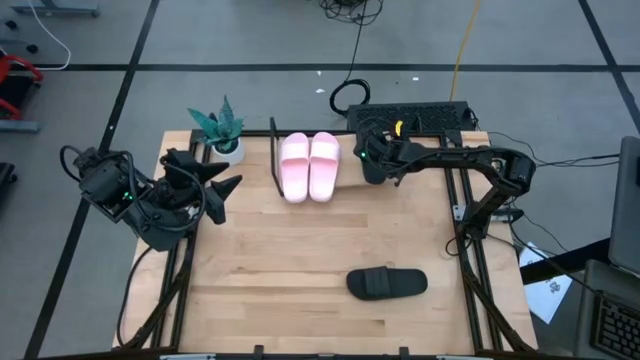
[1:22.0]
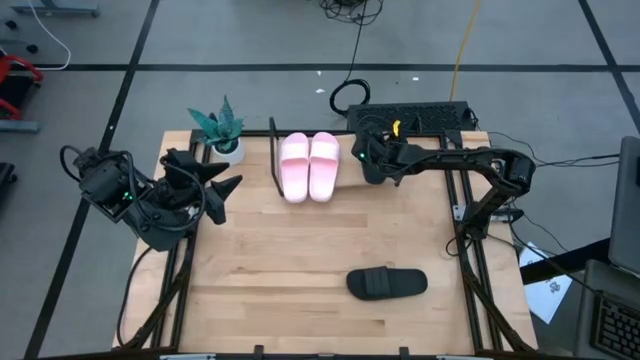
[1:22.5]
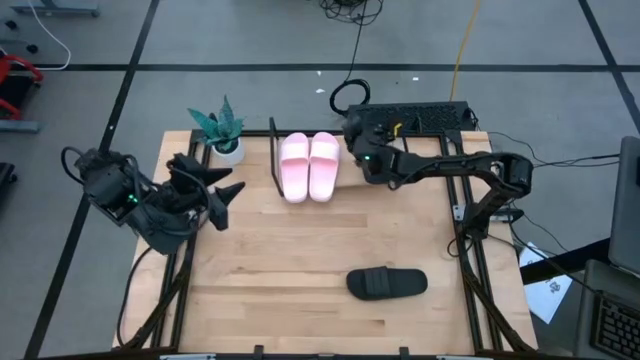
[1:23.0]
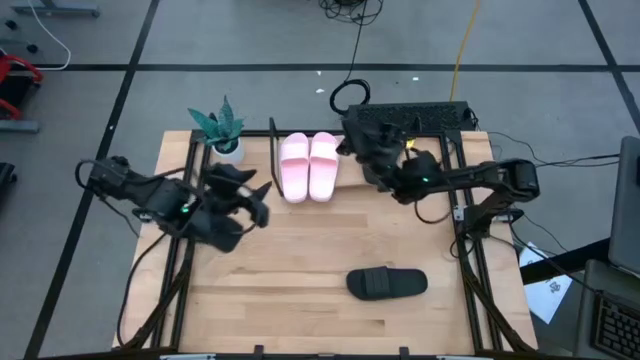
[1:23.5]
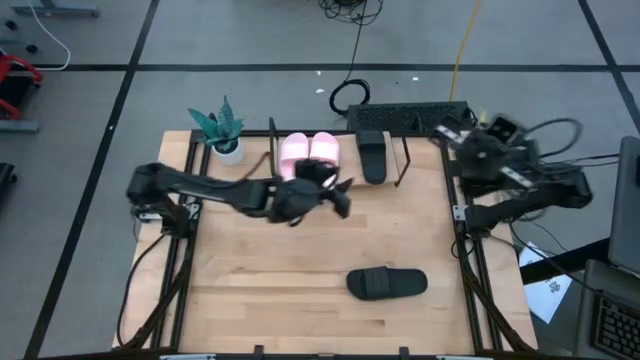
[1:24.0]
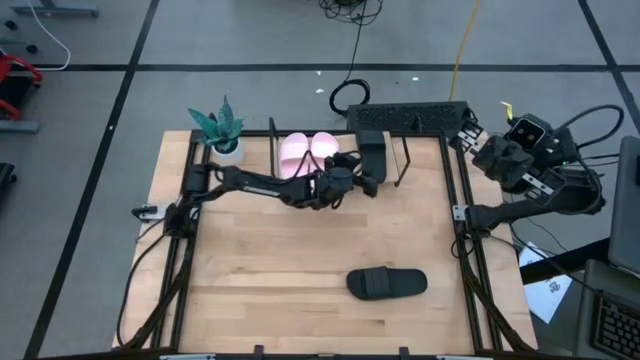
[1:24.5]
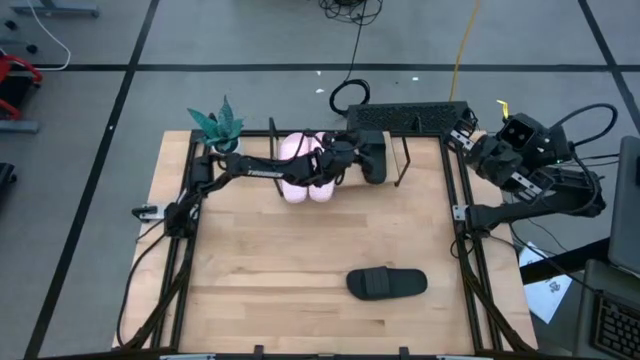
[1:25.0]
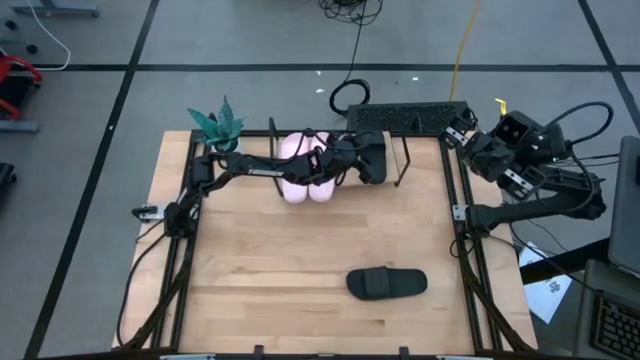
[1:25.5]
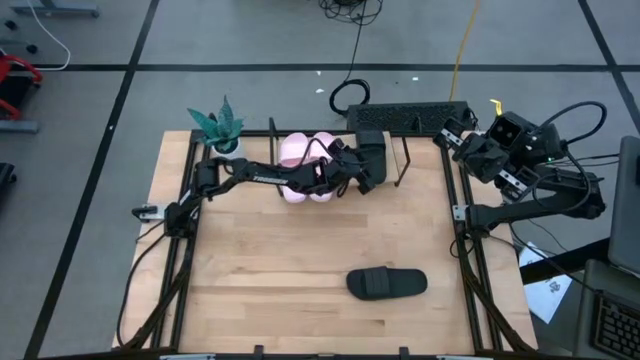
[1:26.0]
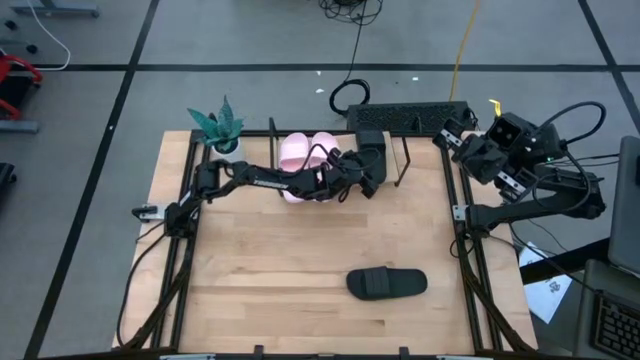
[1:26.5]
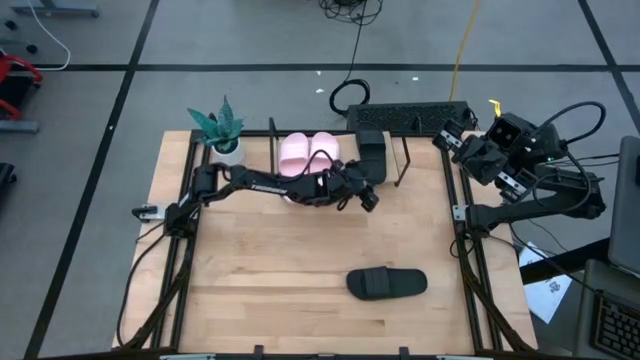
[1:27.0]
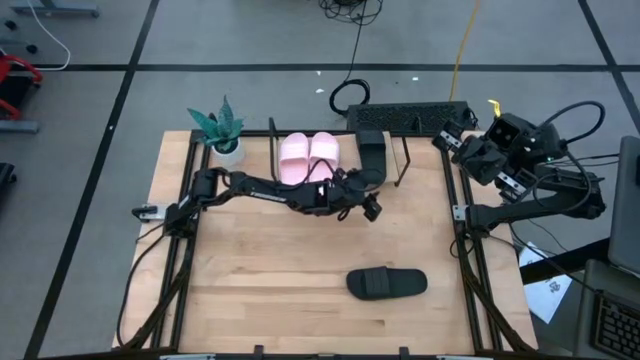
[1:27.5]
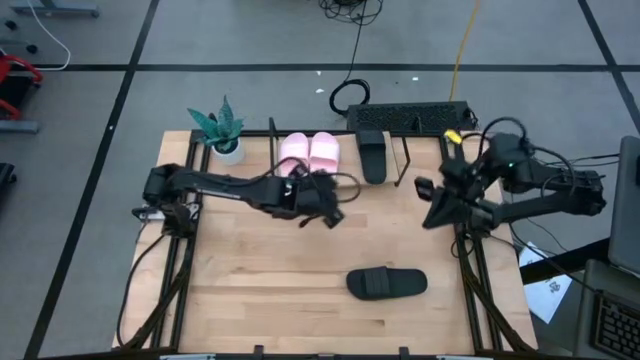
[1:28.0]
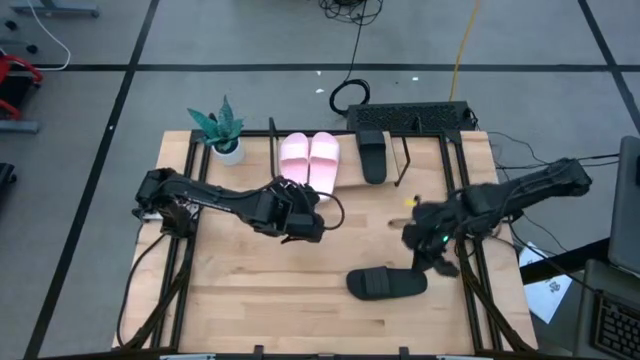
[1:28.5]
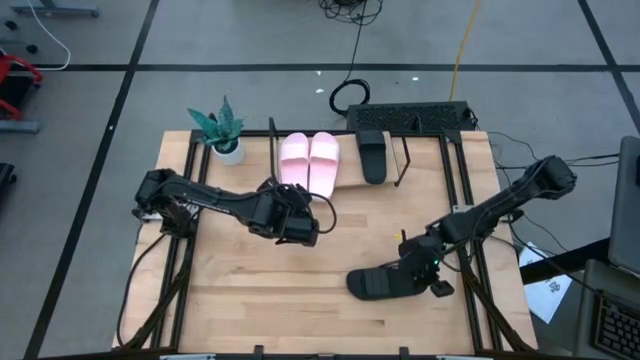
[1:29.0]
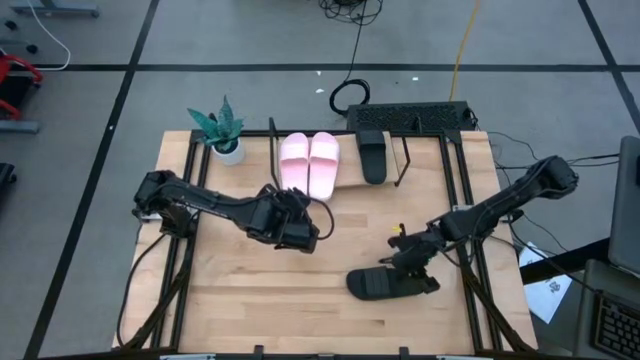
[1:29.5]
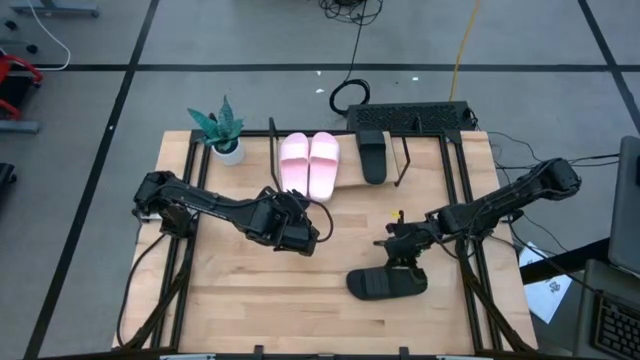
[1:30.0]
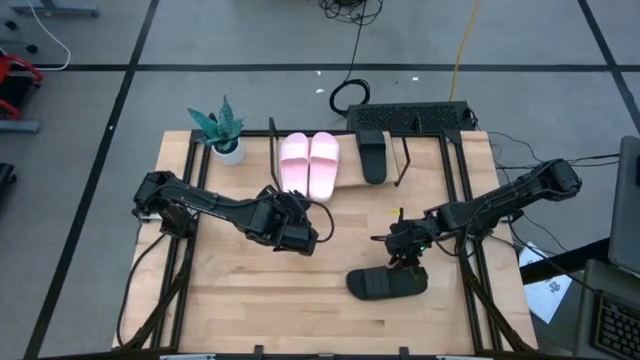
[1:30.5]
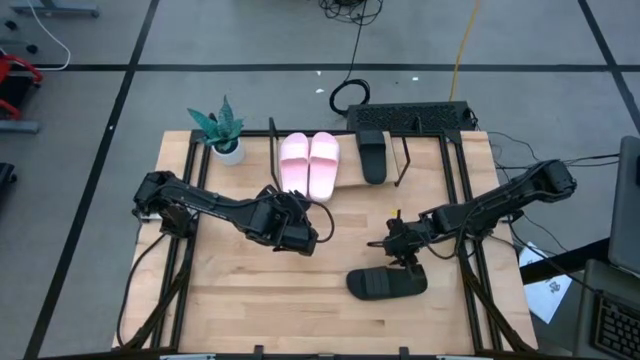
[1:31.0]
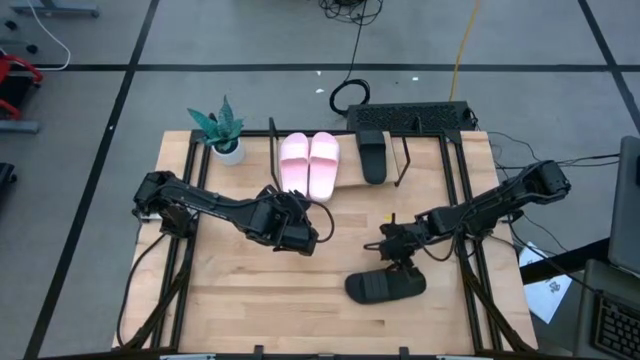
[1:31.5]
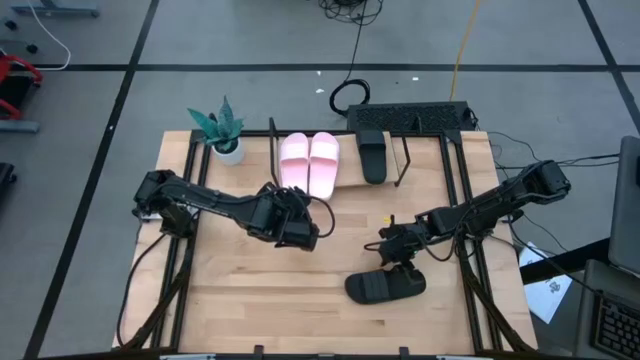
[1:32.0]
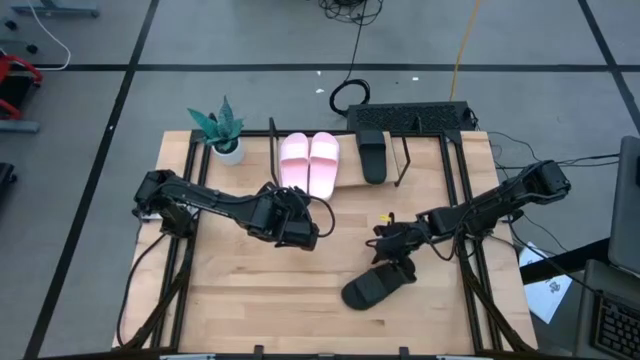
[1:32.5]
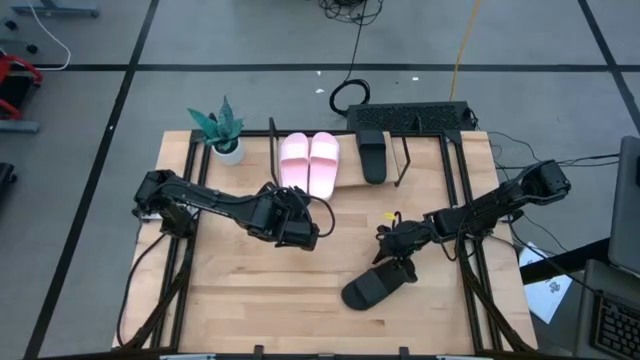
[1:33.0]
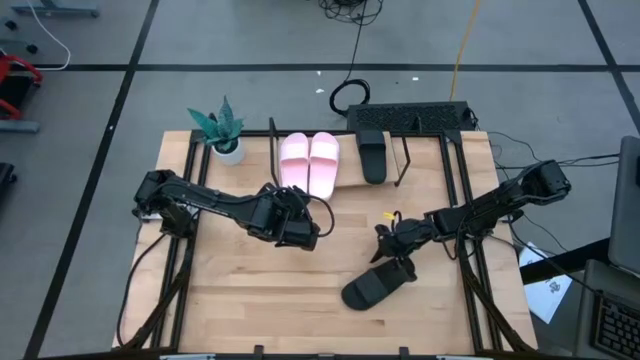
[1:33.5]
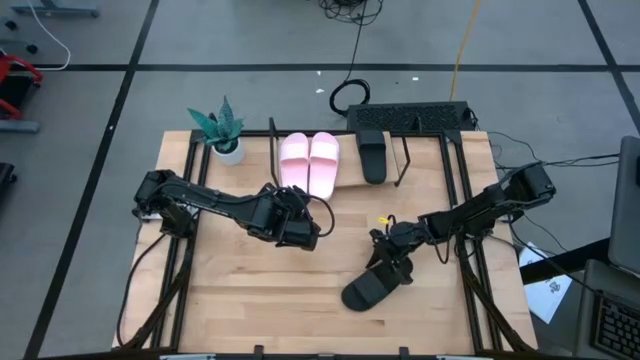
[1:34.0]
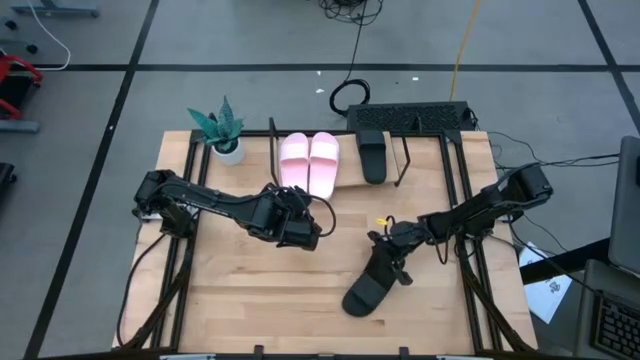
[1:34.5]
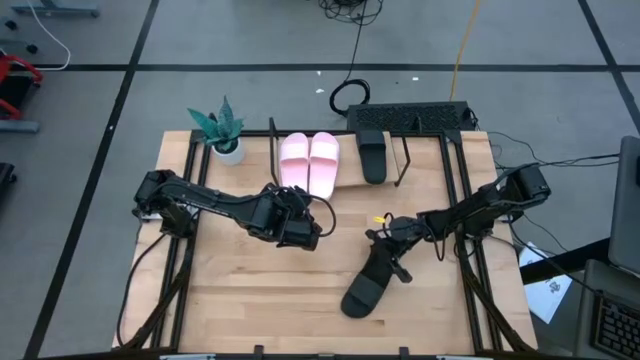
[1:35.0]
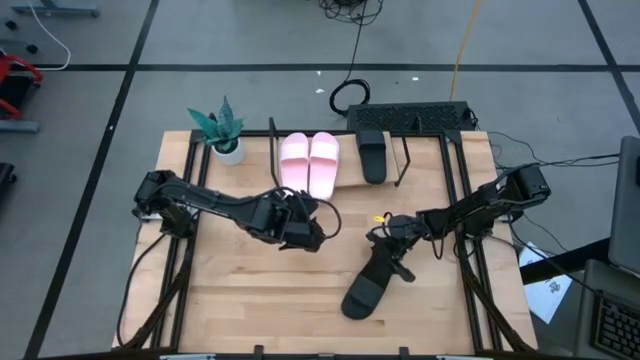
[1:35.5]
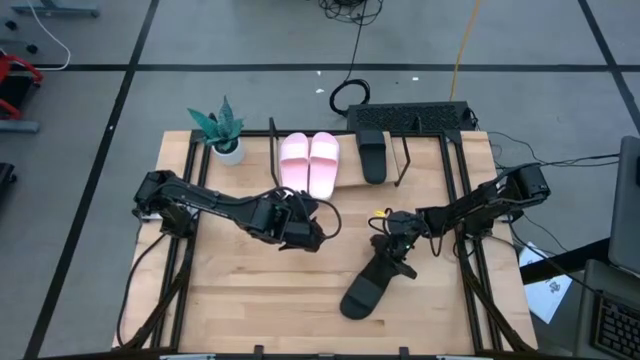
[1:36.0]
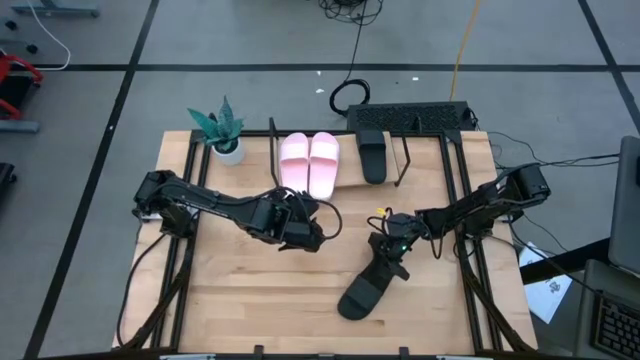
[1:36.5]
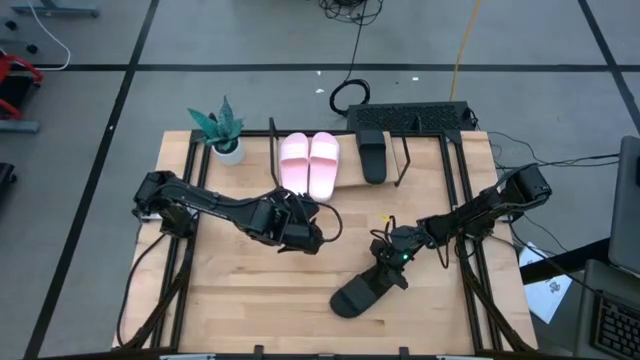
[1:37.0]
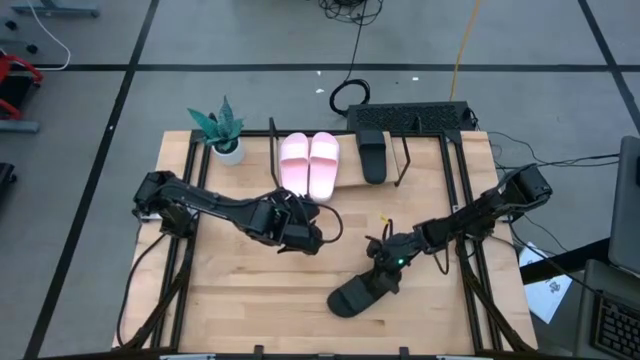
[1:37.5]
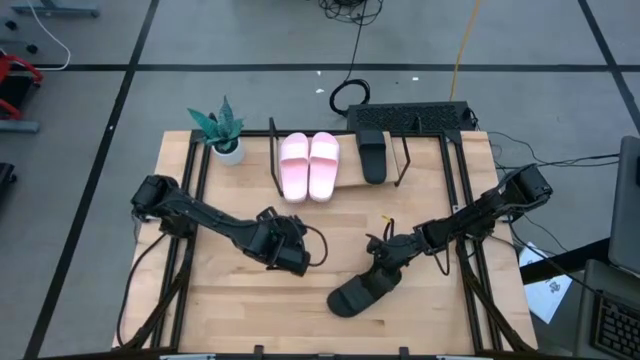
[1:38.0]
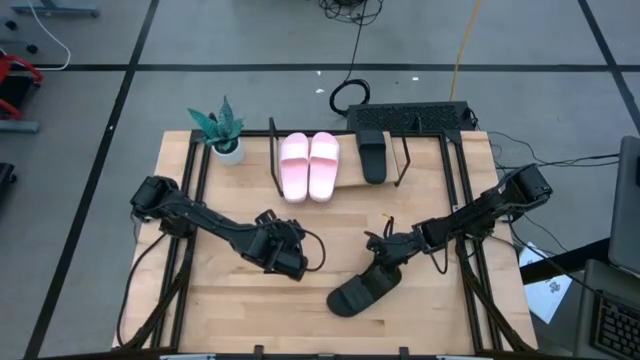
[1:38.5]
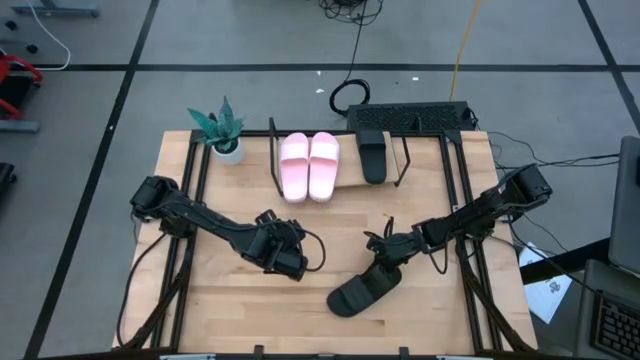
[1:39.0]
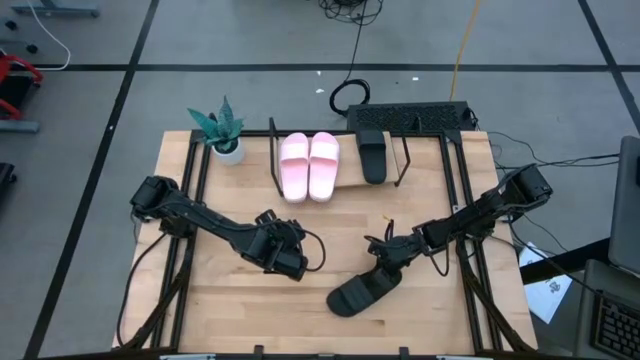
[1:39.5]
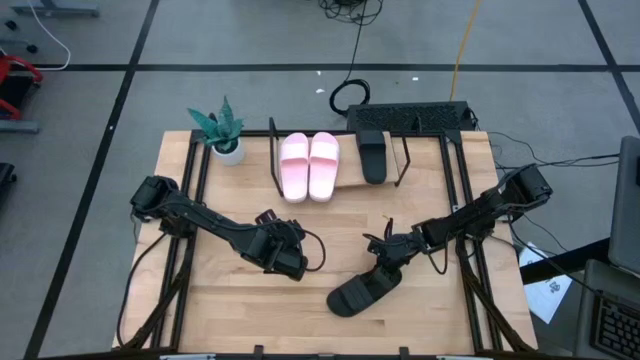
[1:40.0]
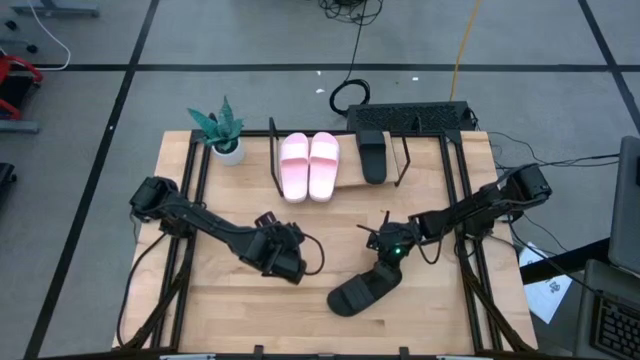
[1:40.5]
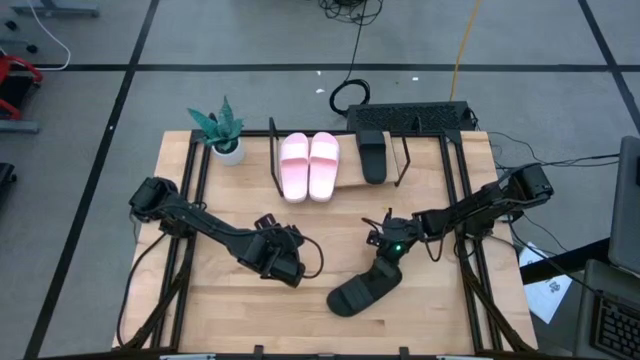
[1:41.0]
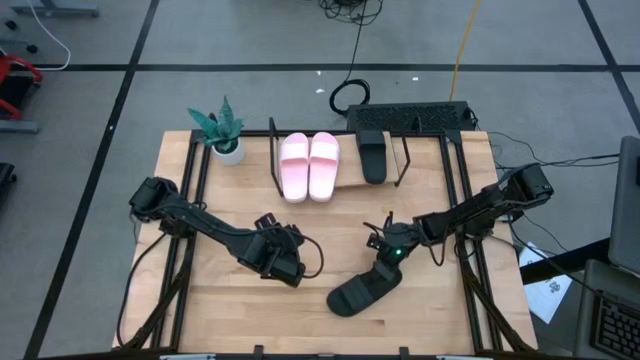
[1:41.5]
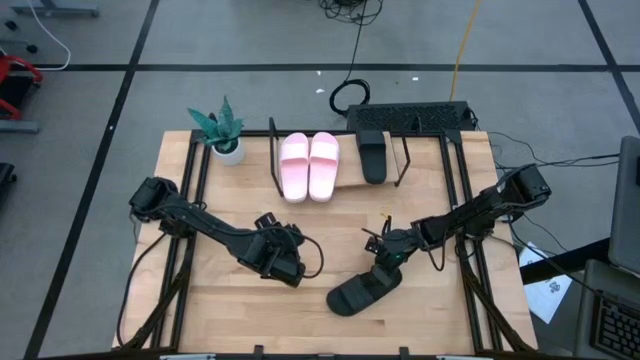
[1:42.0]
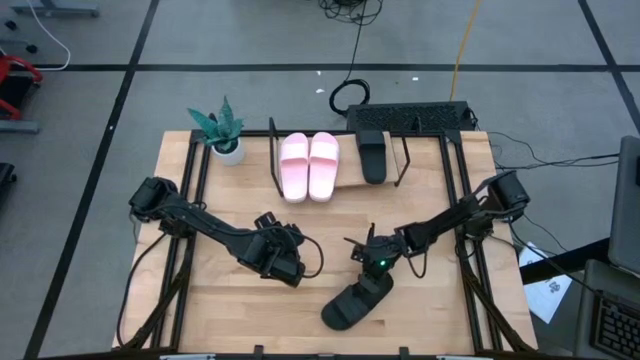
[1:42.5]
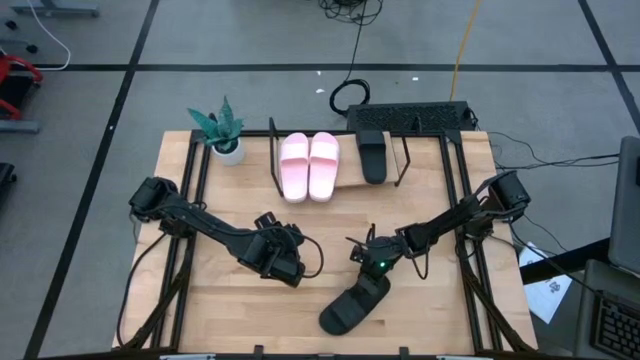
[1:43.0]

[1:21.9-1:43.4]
Task: Pick and place slides into the shelf
Put the black slide on the shelf
